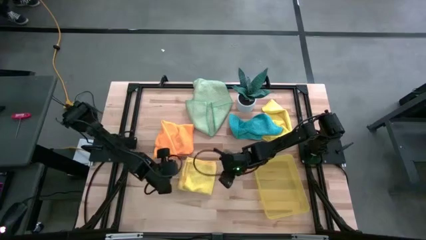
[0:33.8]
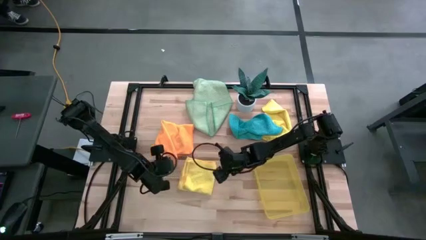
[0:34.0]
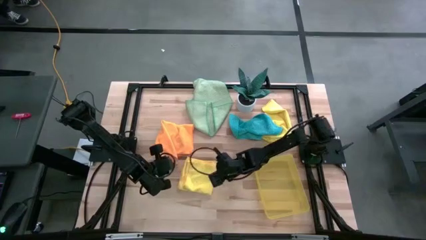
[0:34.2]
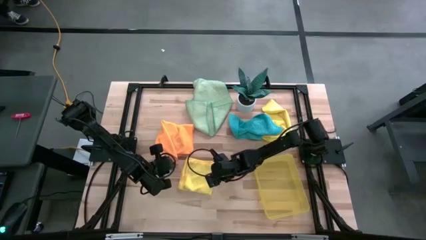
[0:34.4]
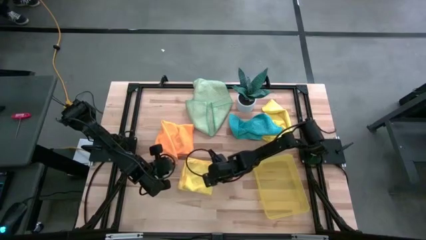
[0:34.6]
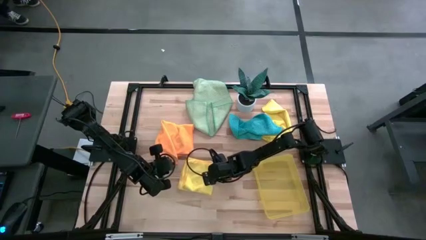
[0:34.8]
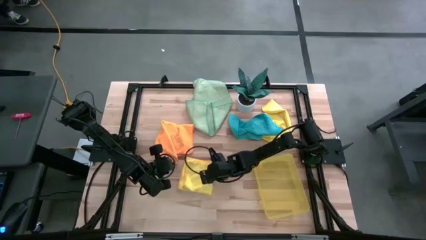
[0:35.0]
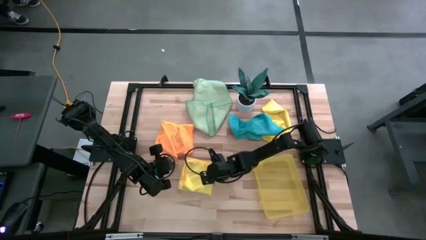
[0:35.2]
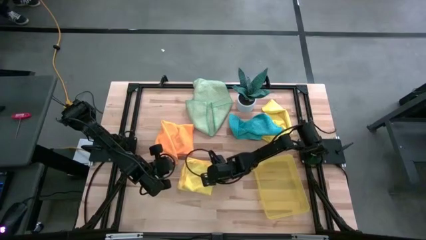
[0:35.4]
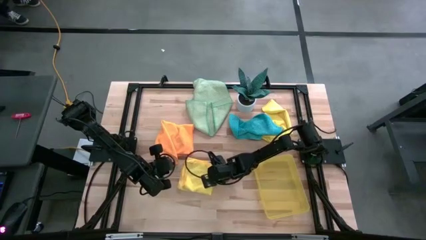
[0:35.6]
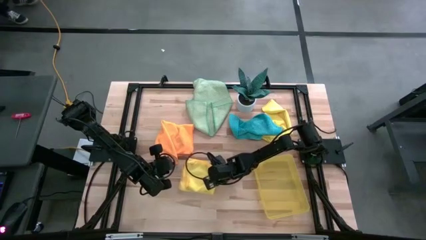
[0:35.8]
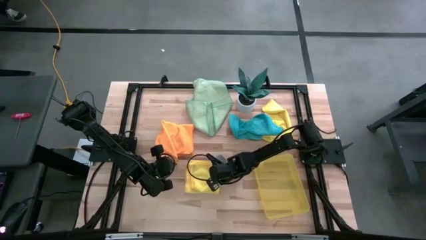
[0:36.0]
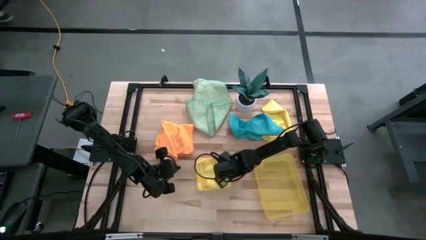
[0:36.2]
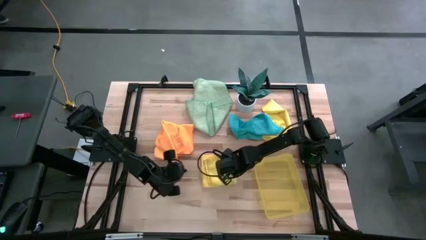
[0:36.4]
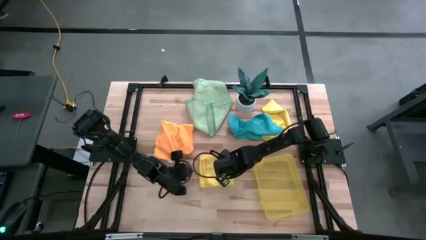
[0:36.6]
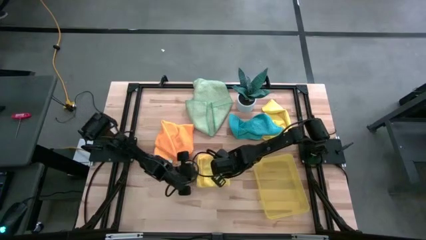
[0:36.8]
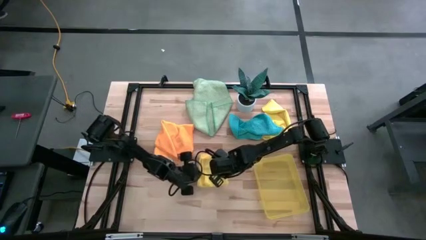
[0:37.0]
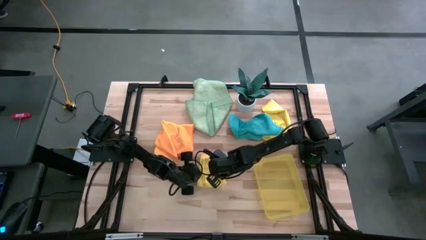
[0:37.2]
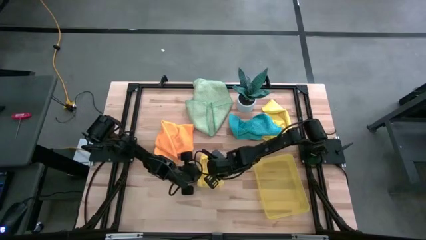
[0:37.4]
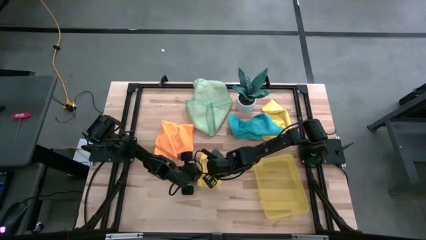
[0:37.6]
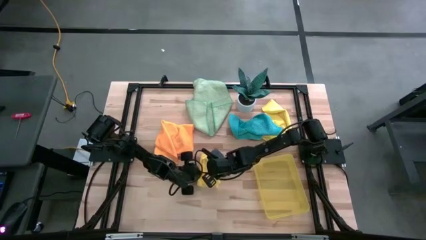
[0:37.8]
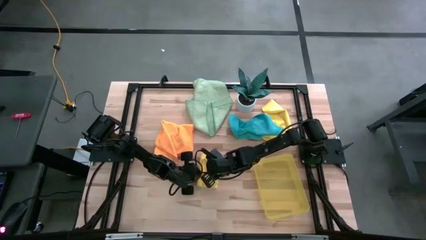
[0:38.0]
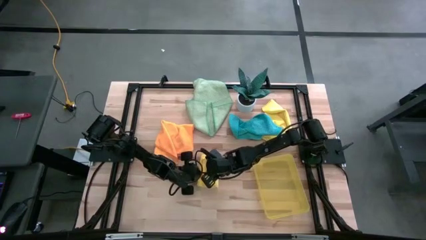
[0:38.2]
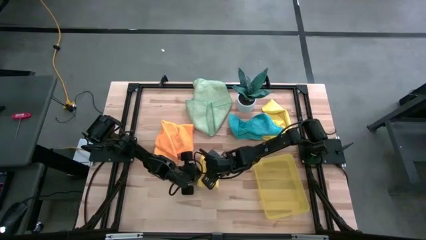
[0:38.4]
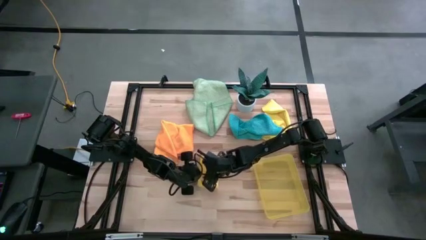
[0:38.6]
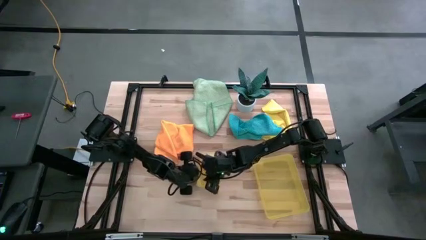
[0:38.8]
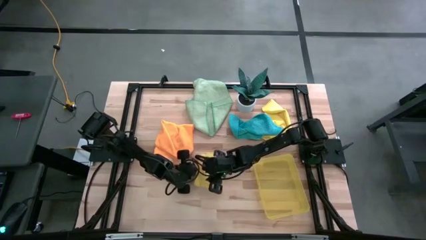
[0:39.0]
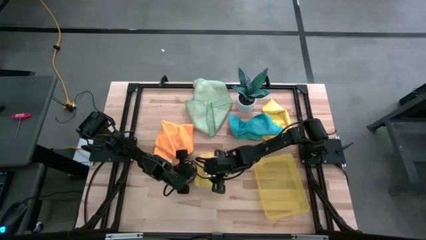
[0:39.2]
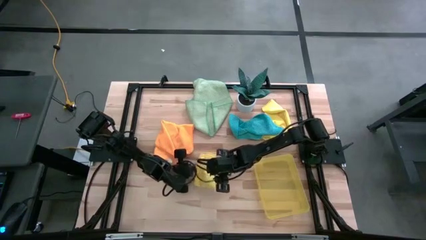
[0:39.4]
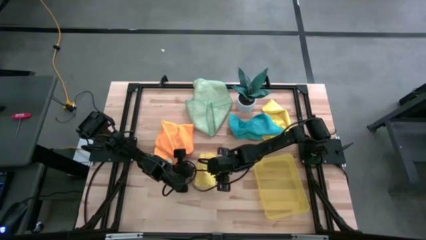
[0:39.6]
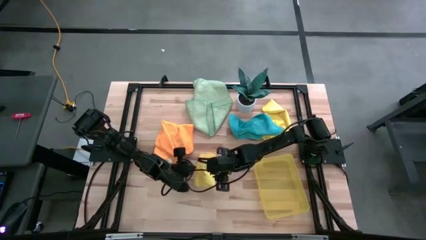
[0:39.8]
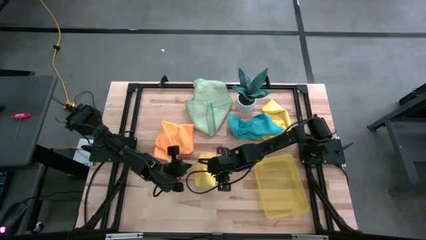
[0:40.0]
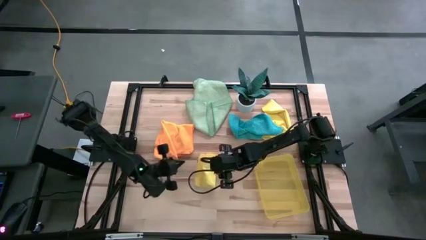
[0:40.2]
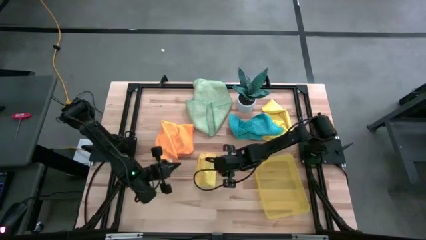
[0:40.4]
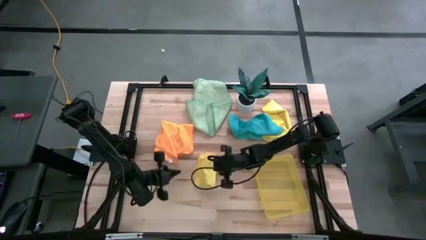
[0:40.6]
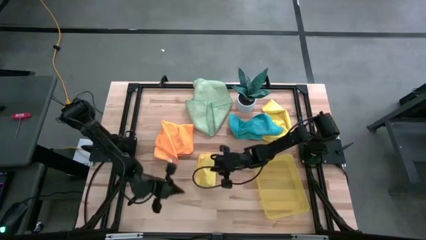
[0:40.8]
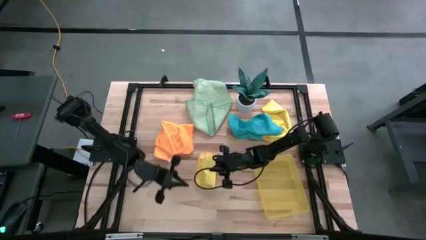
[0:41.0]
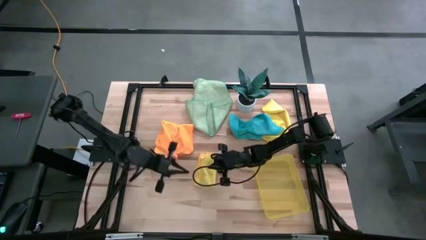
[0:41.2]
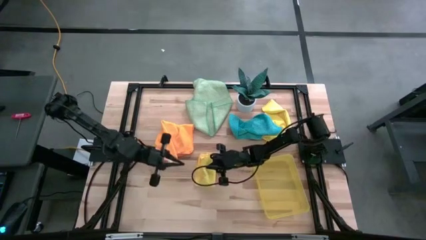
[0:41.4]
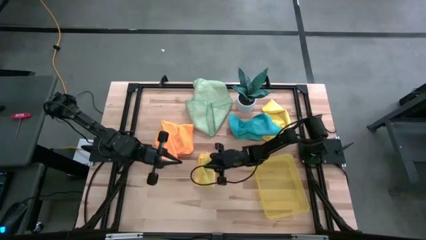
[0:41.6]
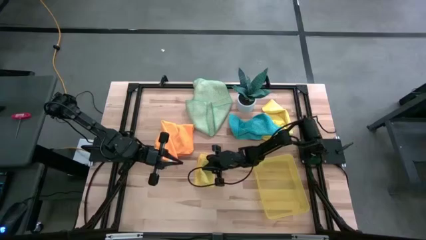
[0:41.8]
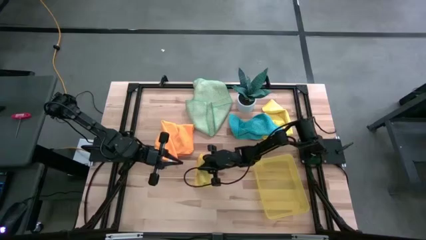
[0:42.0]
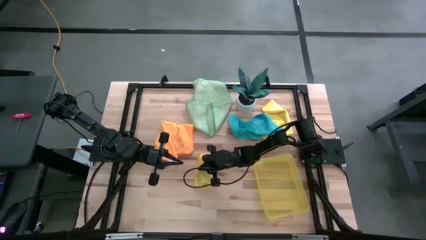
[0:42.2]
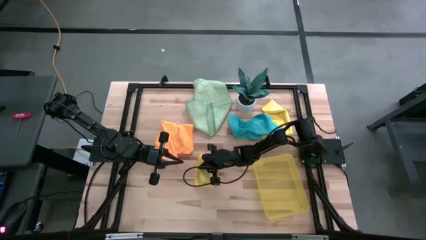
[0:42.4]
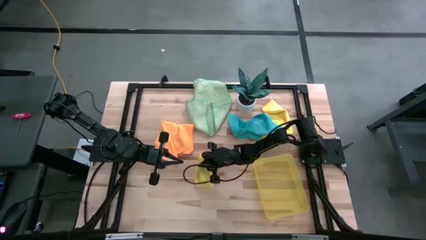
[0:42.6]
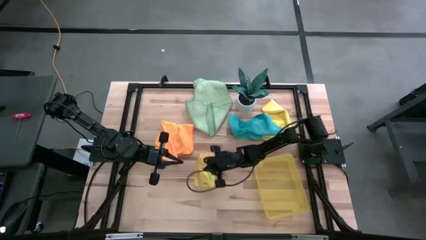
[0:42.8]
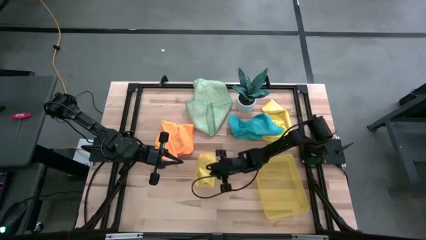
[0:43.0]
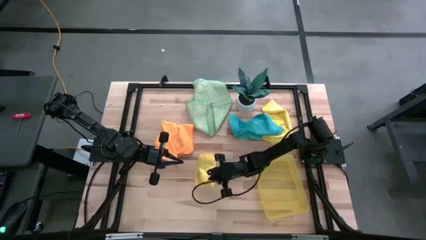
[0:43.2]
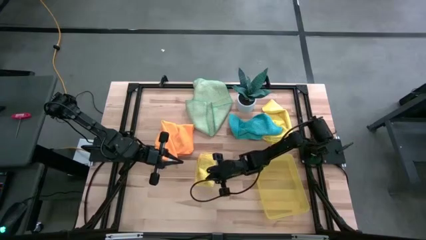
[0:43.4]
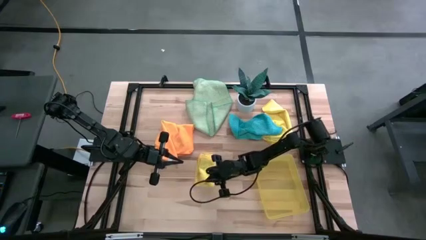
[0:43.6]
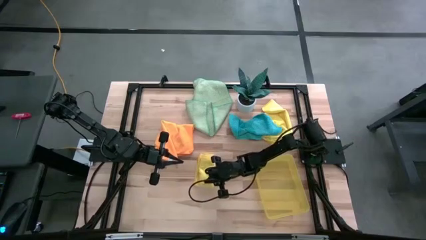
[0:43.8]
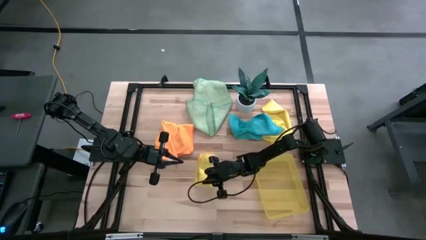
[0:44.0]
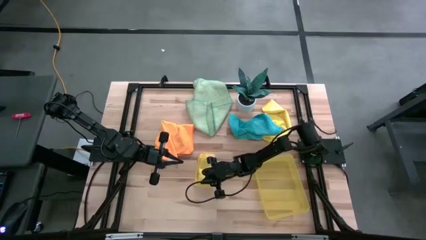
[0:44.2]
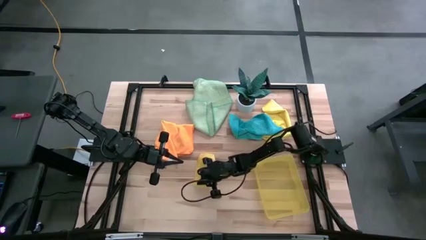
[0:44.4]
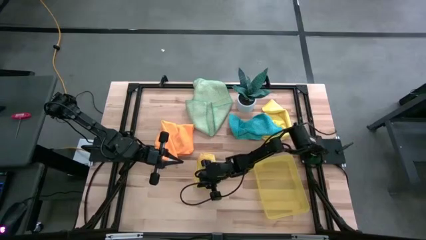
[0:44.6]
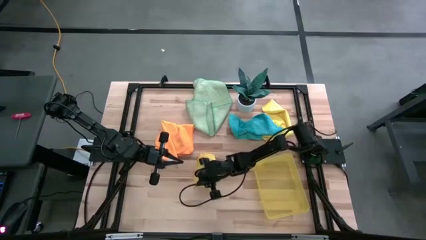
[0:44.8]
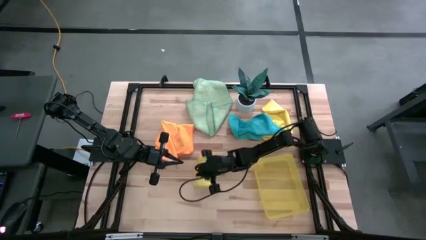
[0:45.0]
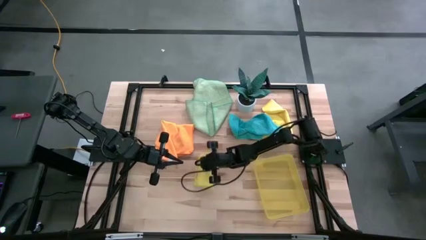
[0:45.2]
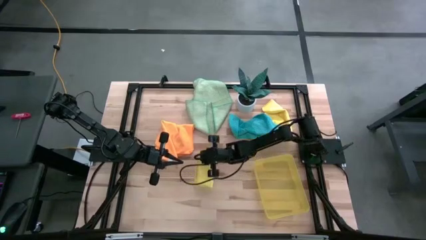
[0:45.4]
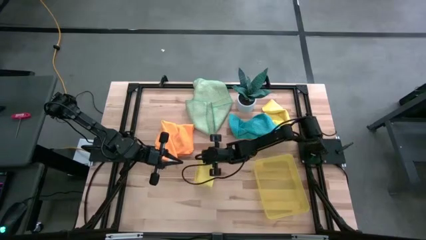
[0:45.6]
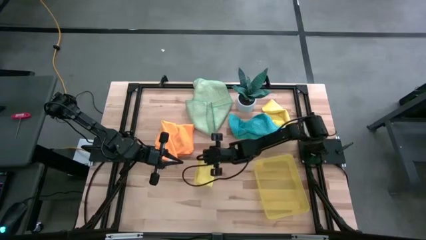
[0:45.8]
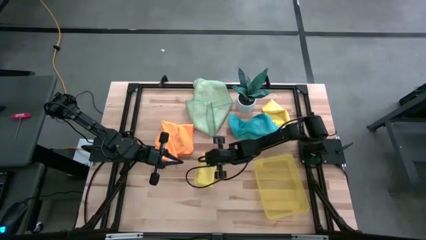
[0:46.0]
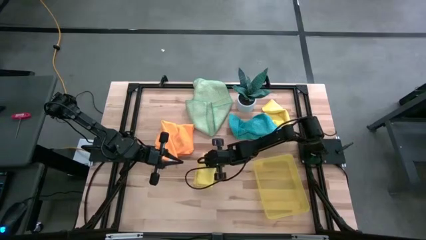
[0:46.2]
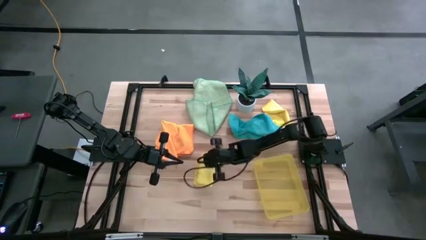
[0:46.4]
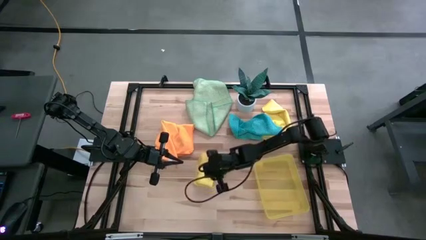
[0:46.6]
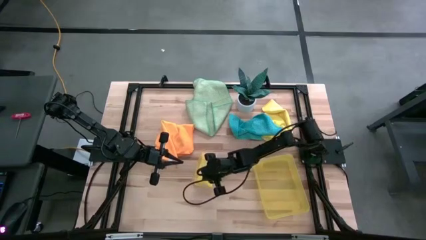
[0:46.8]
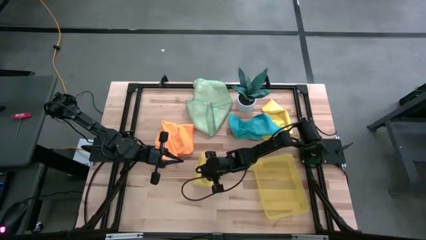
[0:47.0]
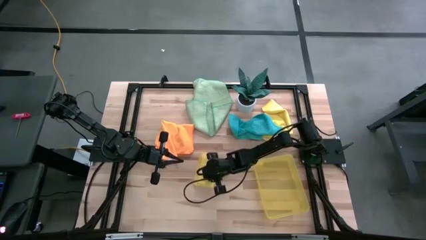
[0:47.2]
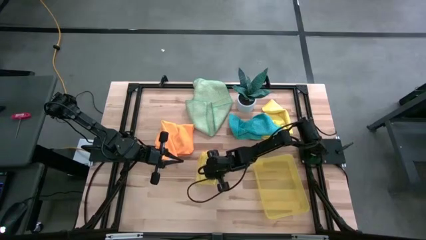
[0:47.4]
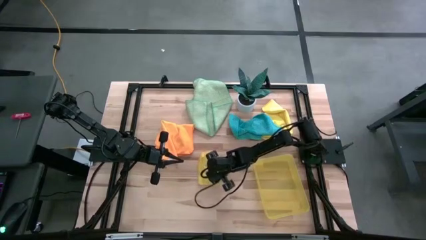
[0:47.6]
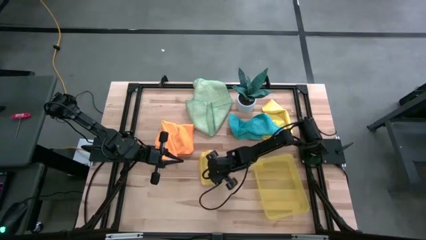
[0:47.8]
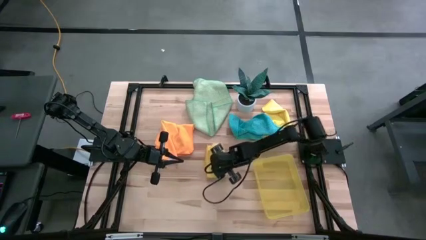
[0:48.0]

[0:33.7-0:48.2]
Task: Fold microfiber towels
Fold the left yellow microfiber cloth

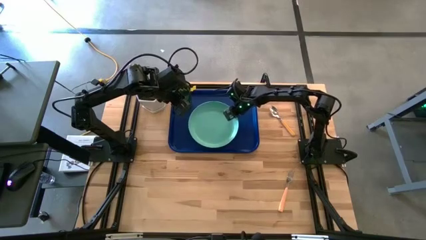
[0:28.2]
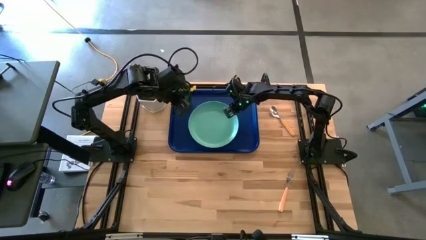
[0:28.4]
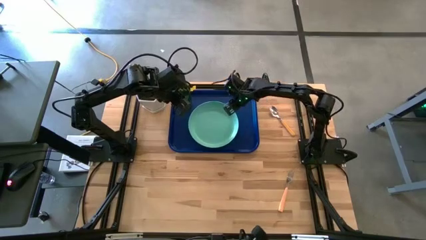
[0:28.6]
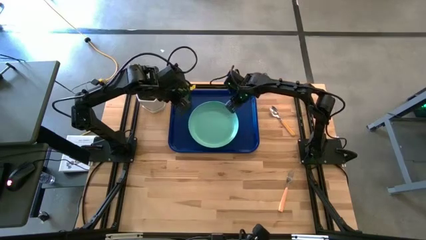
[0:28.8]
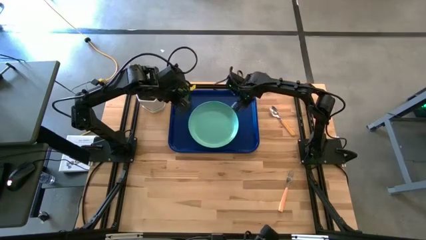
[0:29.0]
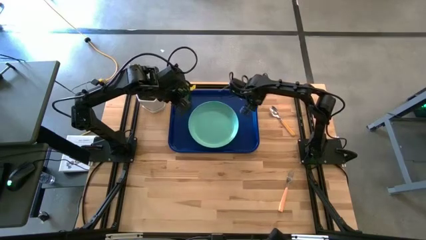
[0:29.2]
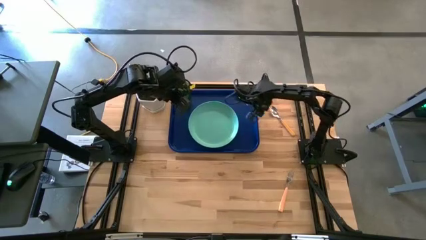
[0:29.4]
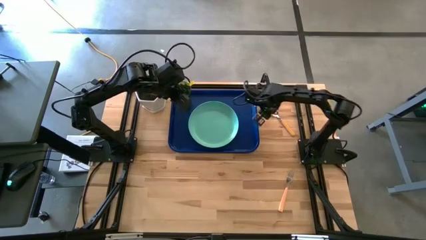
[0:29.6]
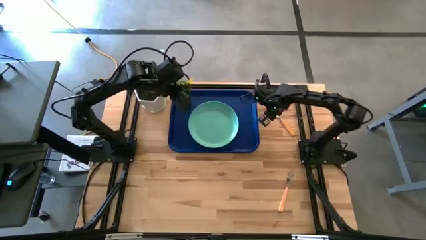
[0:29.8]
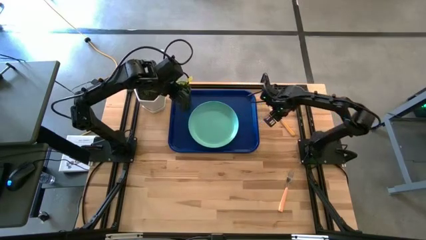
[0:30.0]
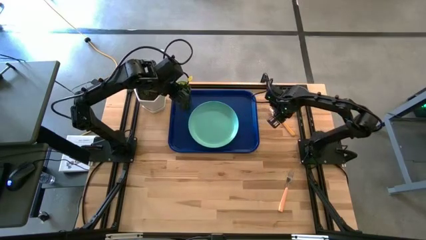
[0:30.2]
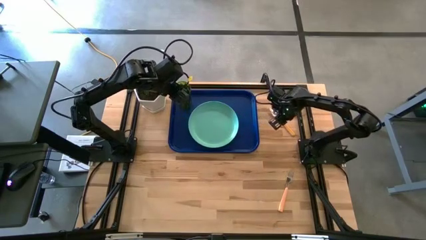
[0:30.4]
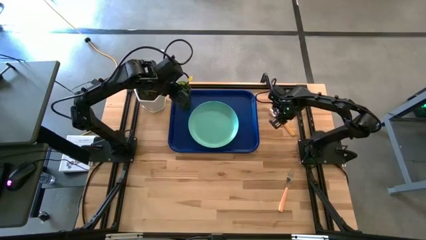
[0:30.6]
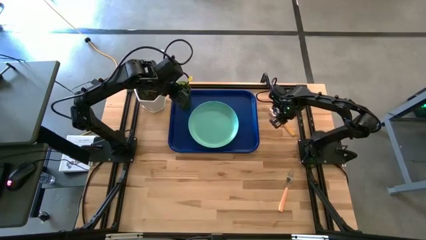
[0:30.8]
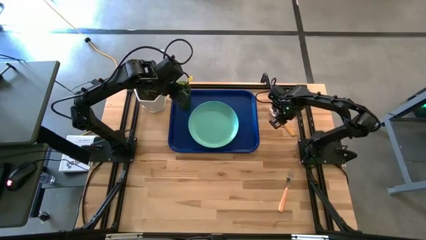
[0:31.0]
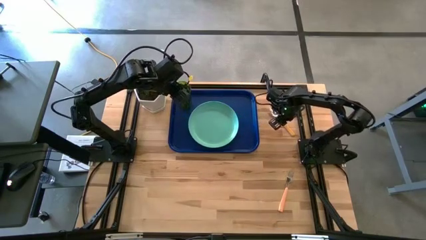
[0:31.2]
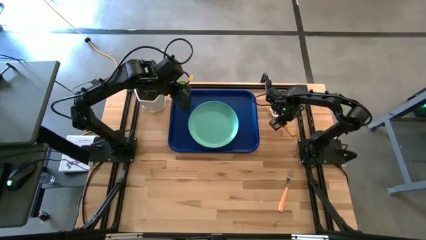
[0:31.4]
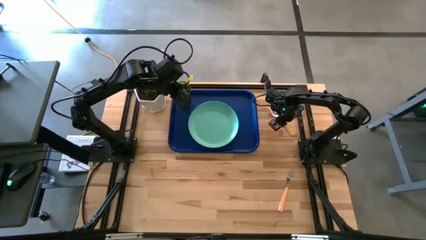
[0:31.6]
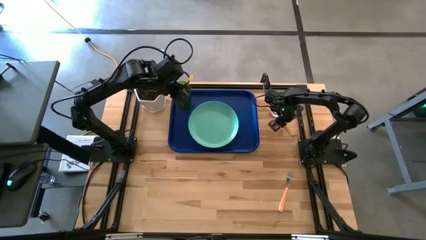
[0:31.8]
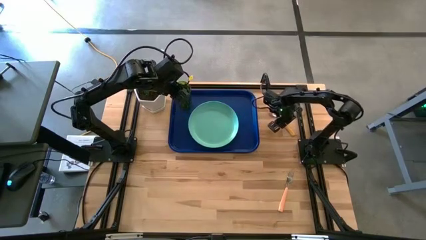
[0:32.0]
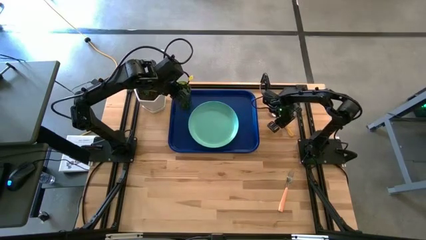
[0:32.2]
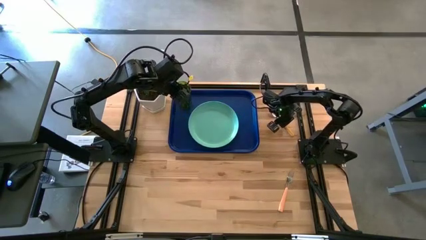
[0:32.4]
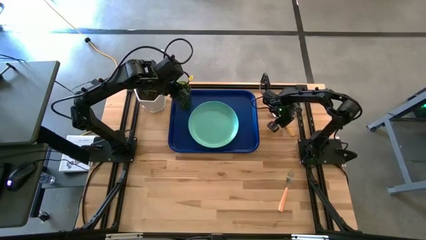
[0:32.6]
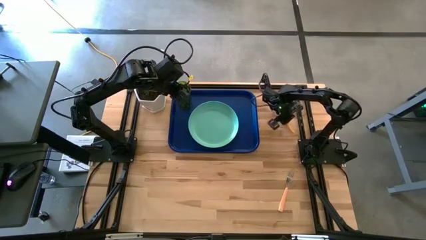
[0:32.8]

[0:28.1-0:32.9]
Task: Pick and place plate/cup/fork/spoon on tray
Put the orange spoon on the blue tray to the right of the green plate
